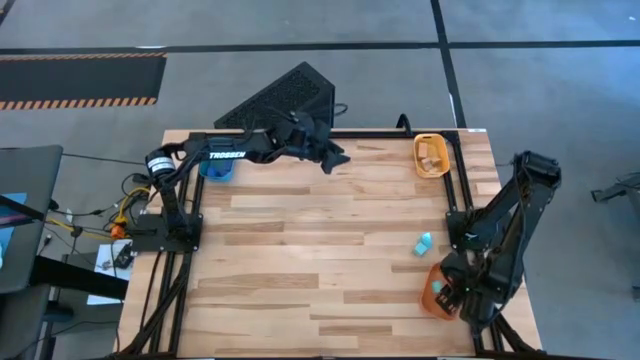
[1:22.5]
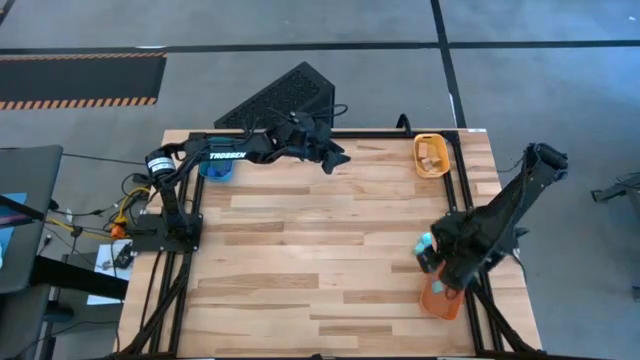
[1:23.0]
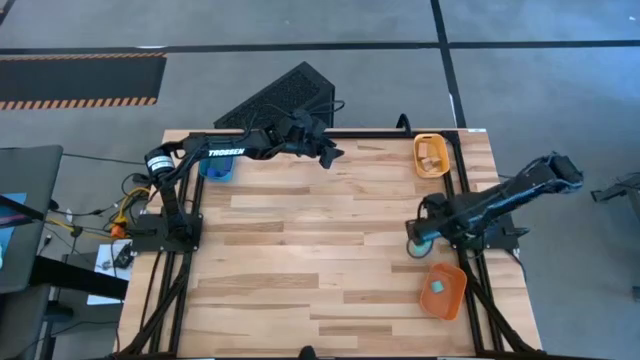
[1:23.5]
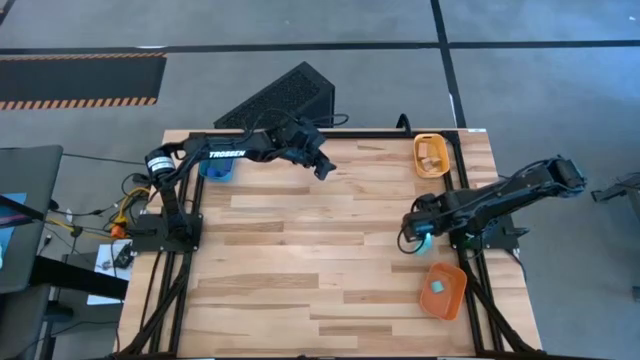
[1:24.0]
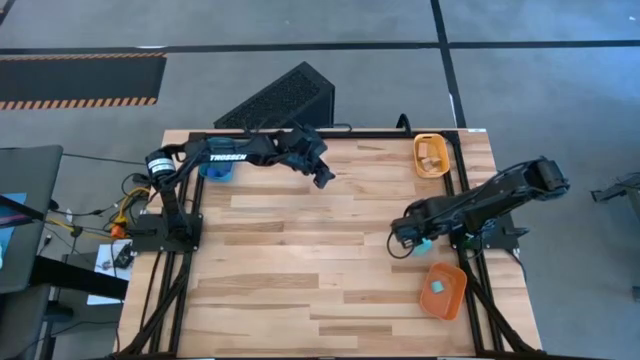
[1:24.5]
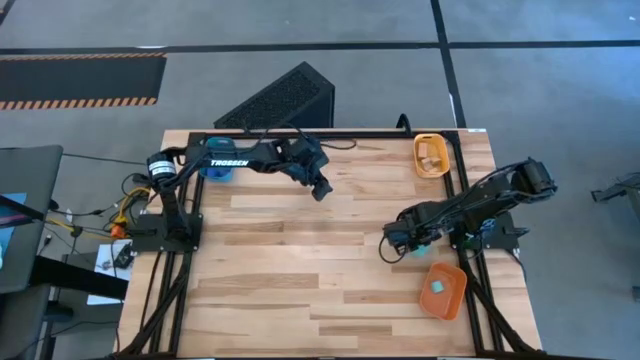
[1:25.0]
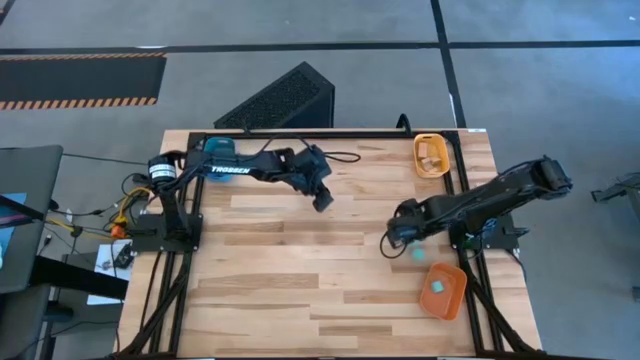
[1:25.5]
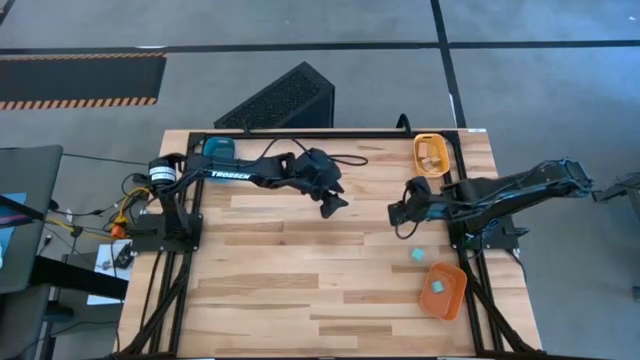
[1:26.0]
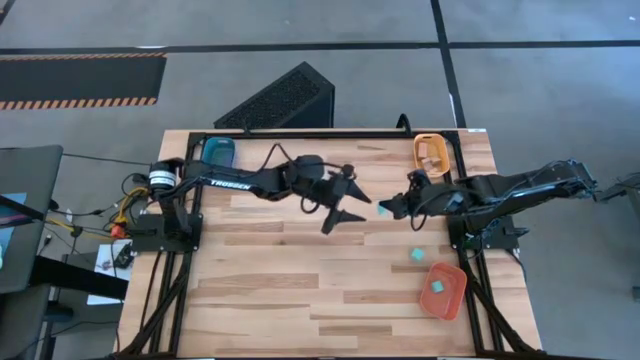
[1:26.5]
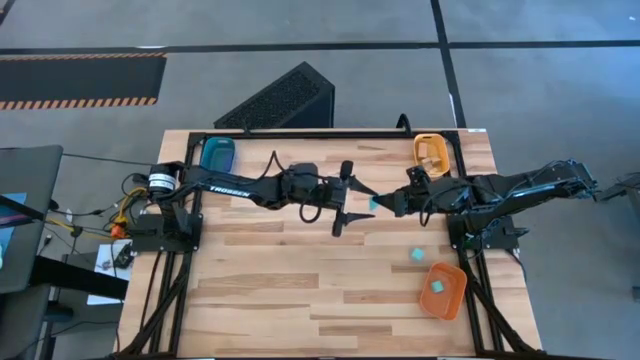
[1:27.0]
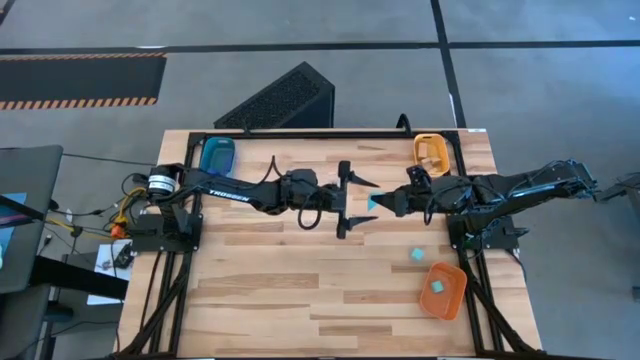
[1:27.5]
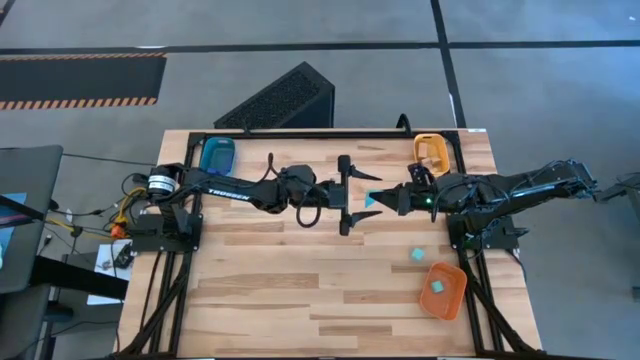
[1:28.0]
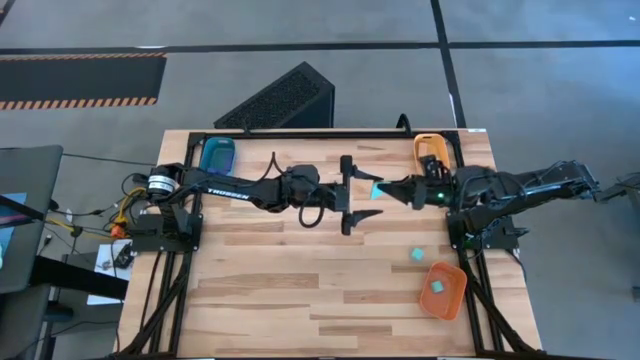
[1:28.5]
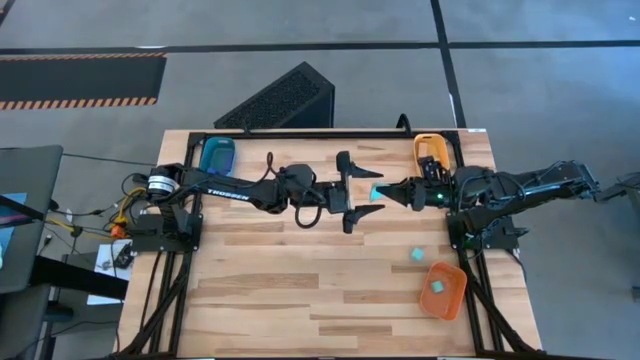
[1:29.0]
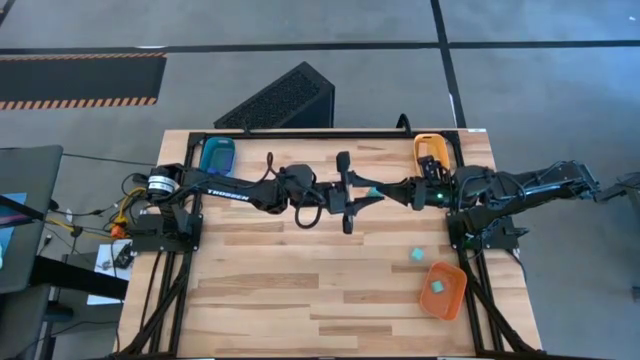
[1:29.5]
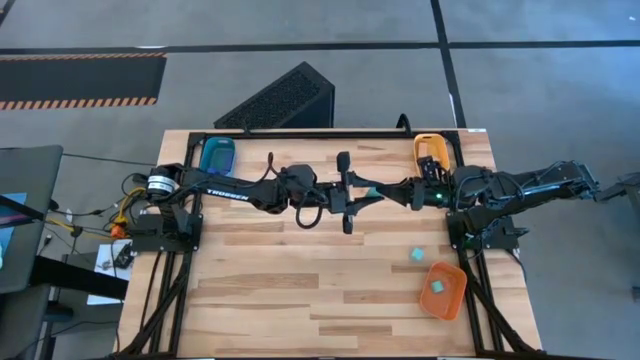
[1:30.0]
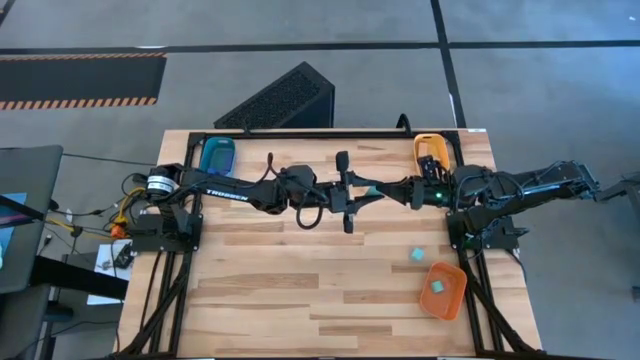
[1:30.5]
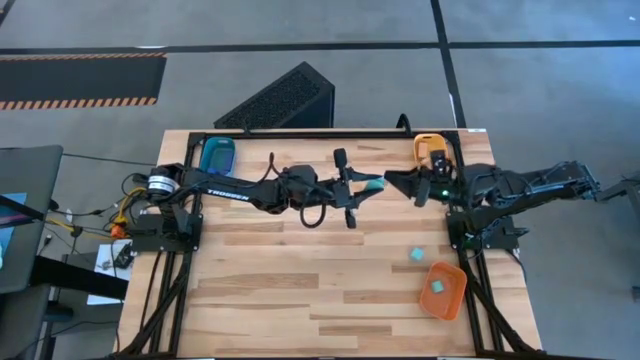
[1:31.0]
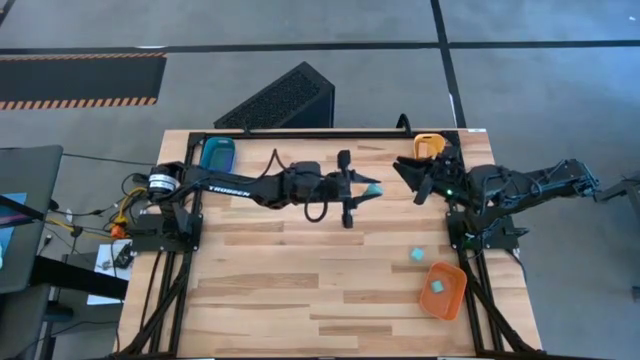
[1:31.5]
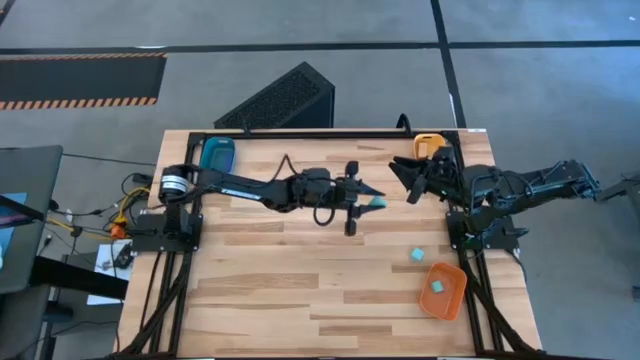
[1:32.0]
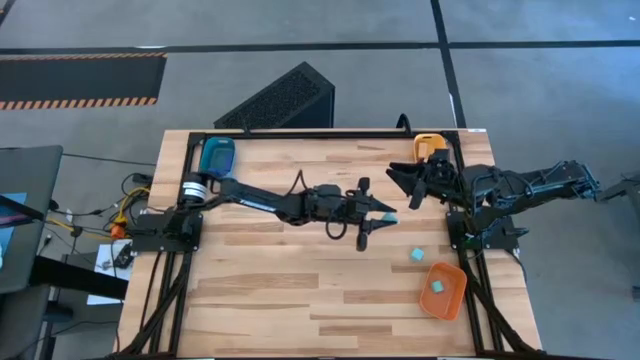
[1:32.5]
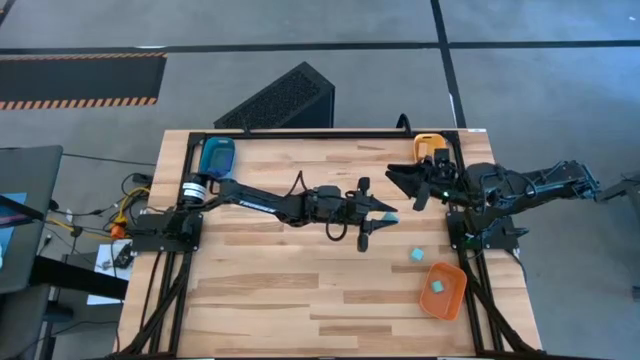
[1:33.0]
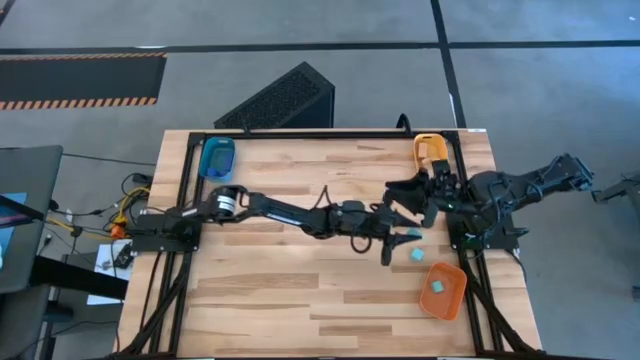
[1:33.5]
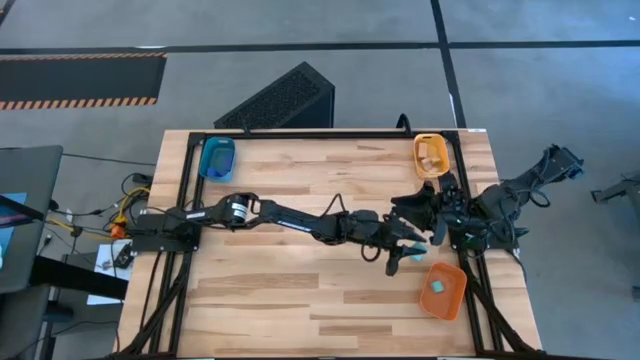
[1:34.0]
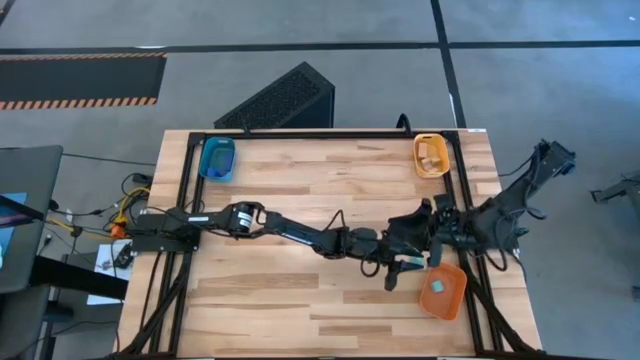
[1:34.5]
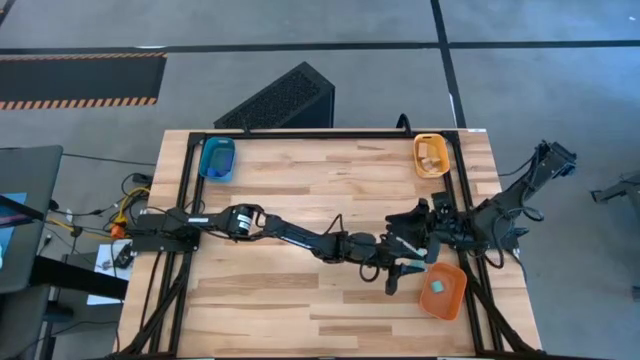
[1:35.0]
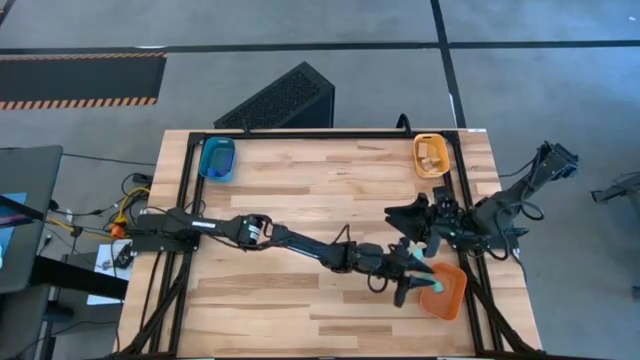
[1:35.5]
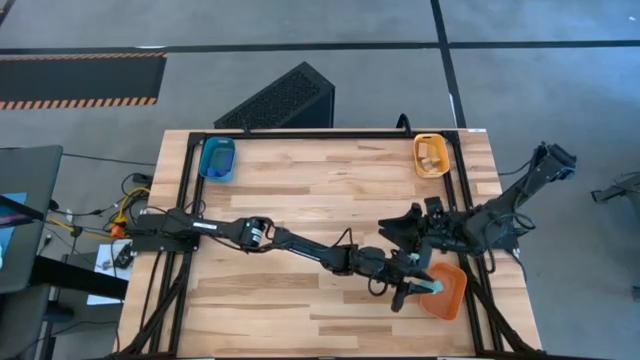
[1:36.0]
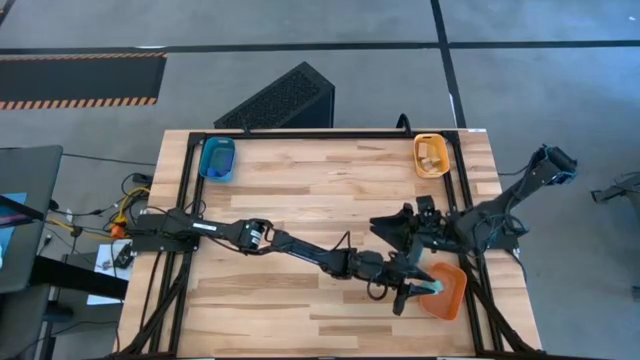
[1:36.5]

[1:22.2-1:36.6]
Task: Sort & place blocks by color
Put the top light blue block into the orange bin

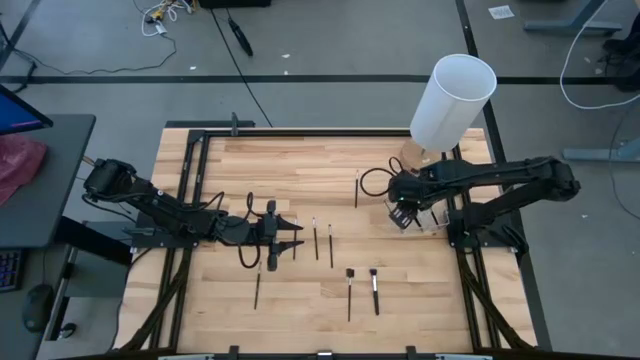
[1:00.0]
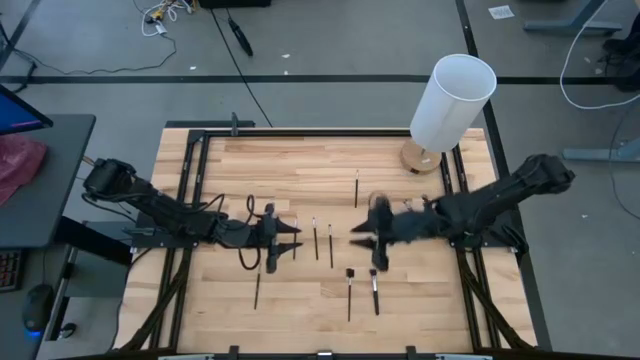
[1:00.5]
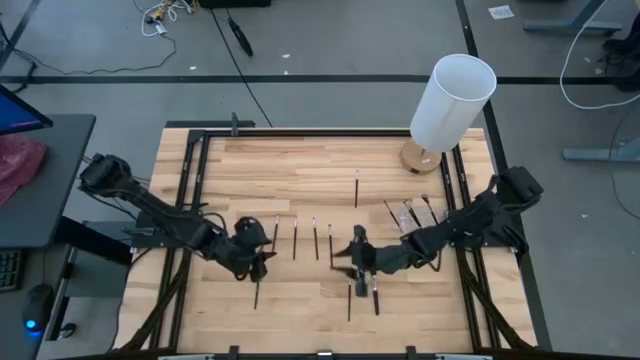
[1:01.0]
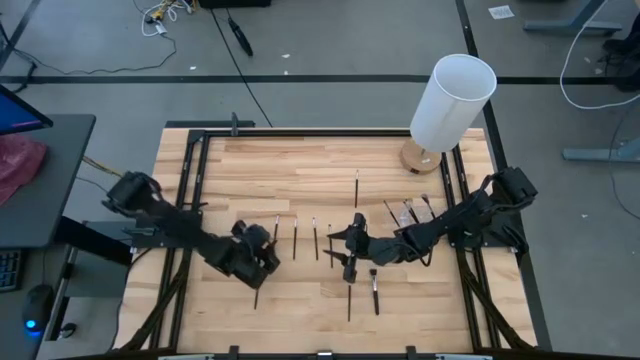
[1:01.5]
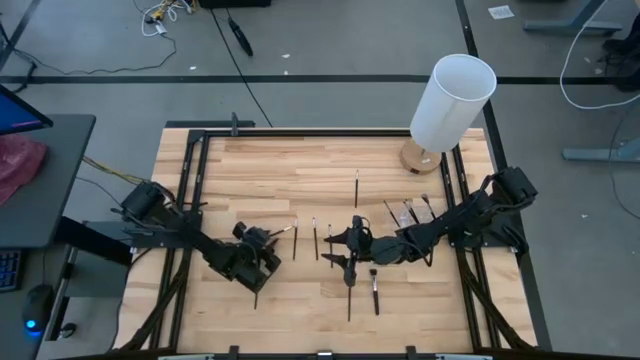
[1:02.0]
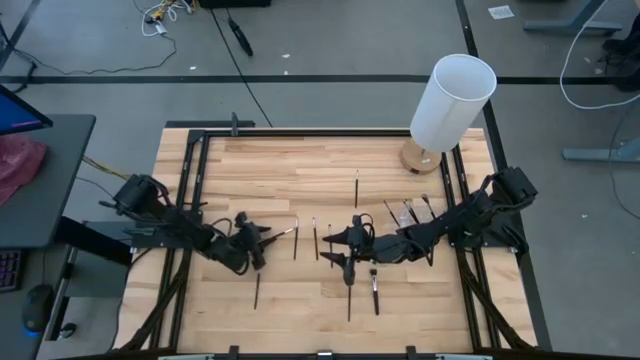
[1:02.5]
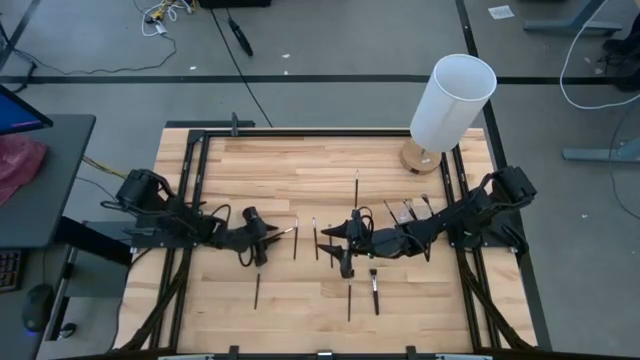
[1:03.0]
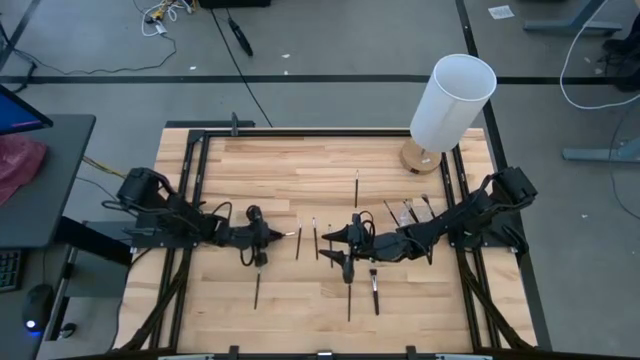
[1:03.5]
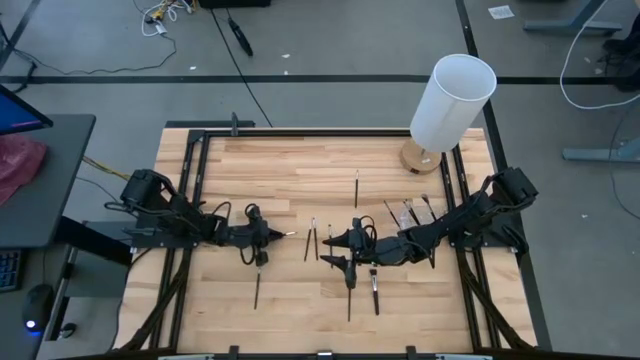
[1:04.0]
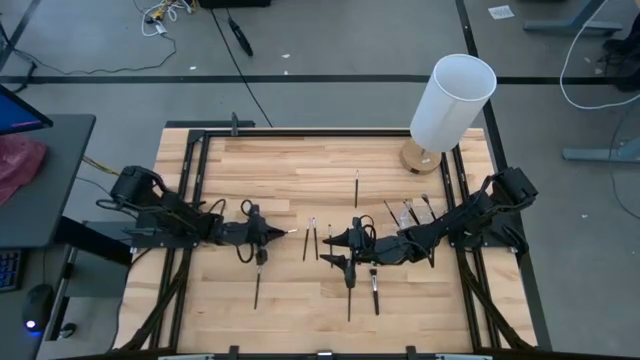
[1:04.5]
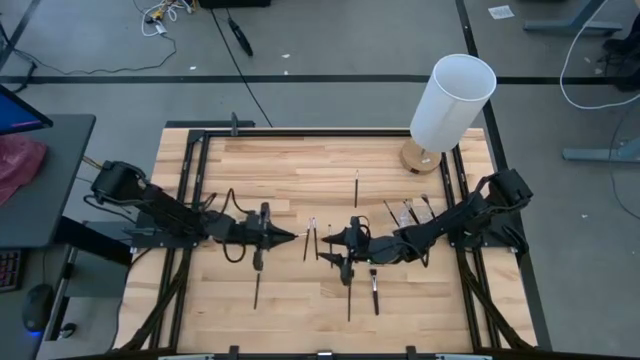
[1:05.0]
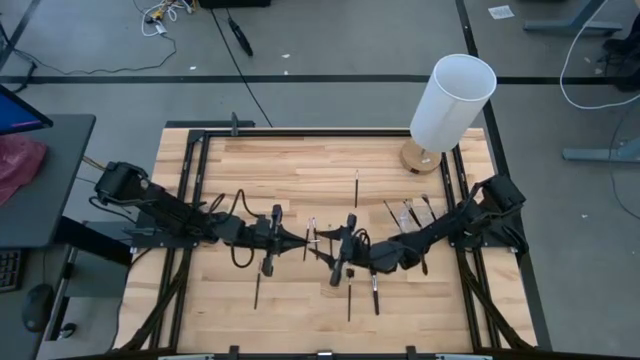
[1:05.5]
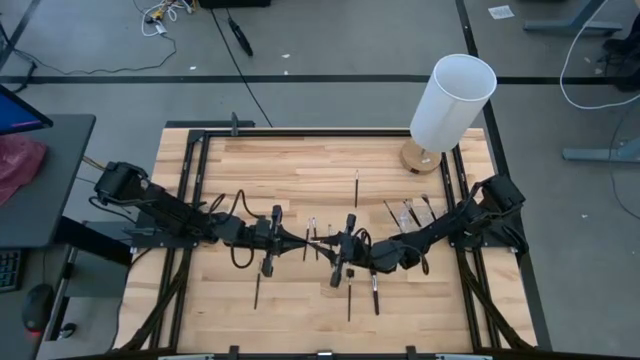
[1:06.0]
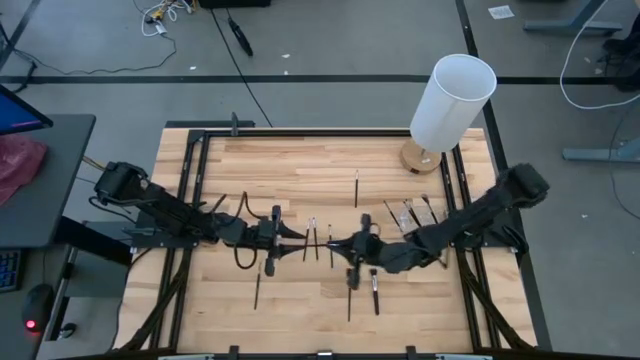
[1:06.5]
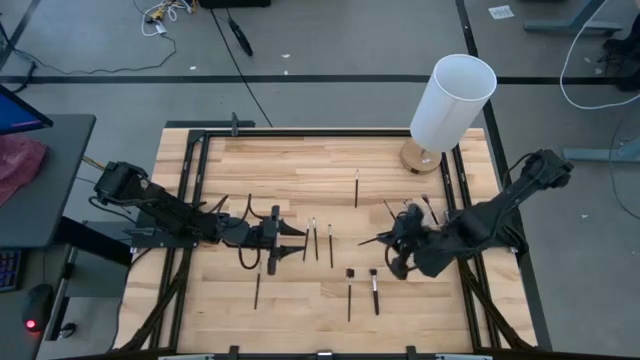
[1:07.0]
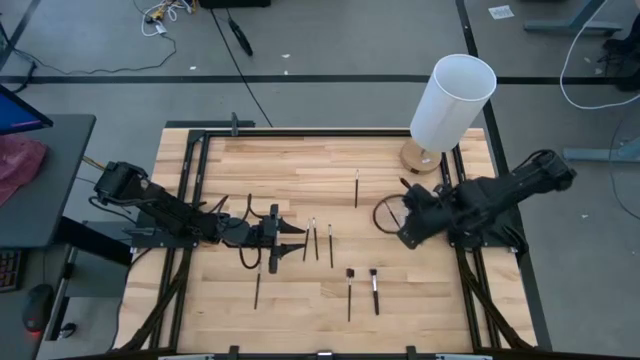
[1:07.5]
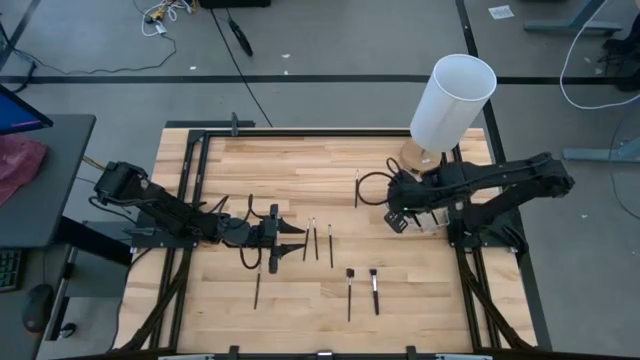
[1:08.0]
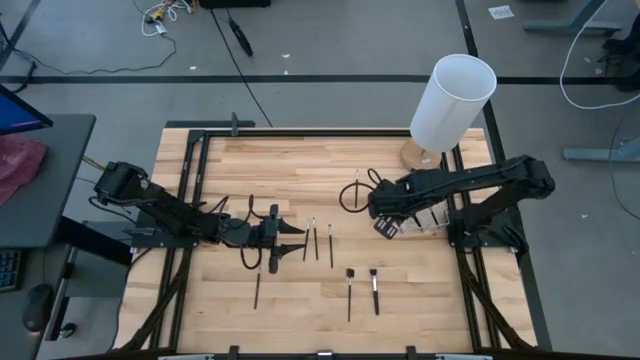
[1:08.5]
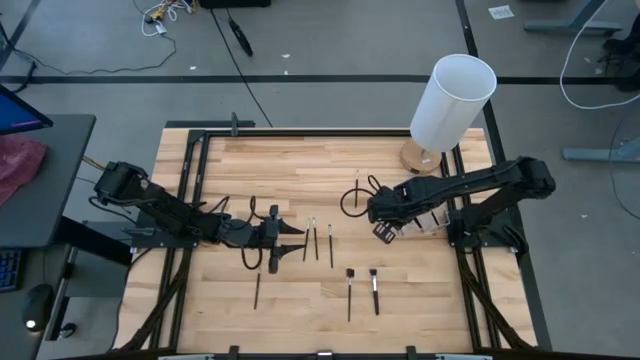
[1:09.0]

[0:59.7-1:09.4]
Task: Put items in baskets/containers
Put the black eyeshadow brush into the transparent organizer
